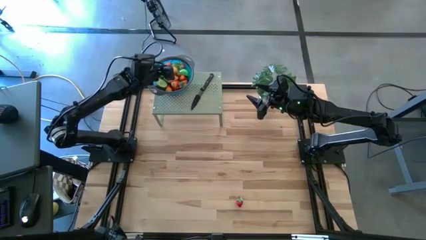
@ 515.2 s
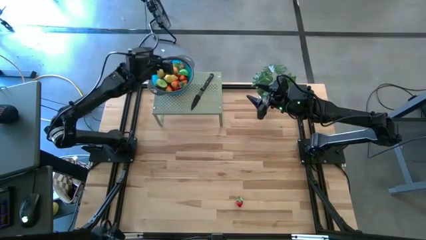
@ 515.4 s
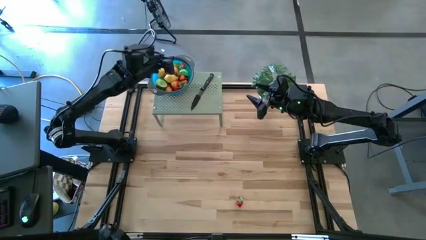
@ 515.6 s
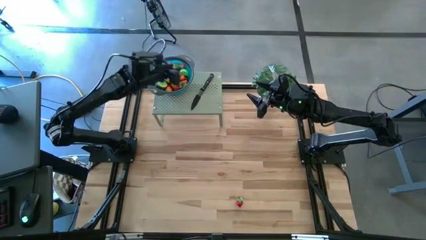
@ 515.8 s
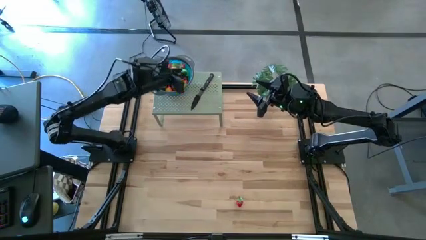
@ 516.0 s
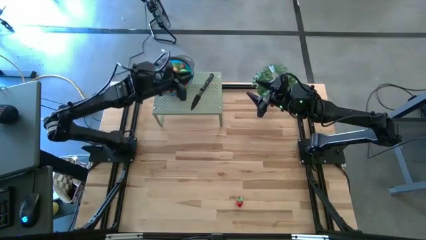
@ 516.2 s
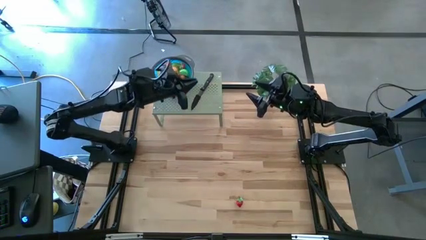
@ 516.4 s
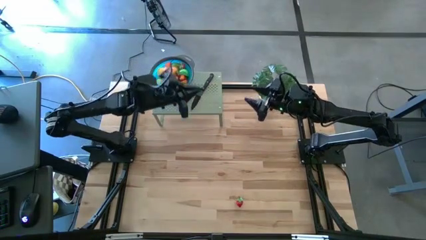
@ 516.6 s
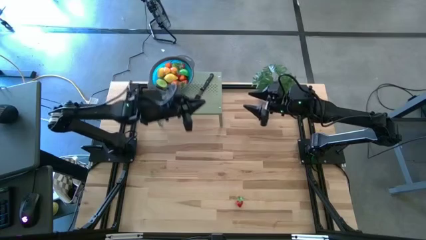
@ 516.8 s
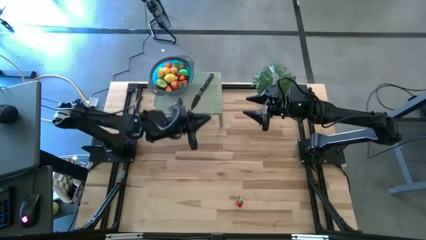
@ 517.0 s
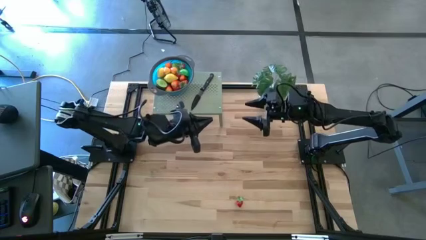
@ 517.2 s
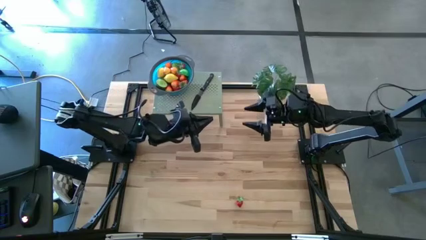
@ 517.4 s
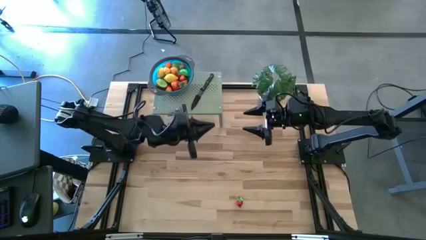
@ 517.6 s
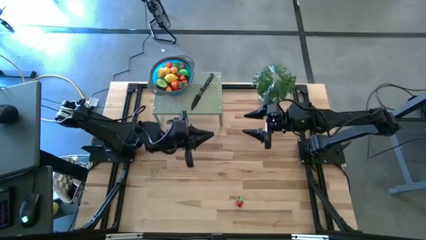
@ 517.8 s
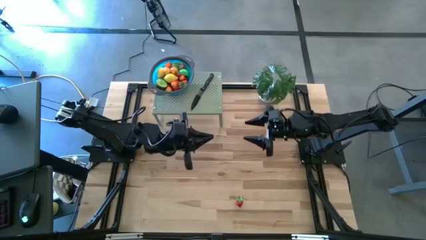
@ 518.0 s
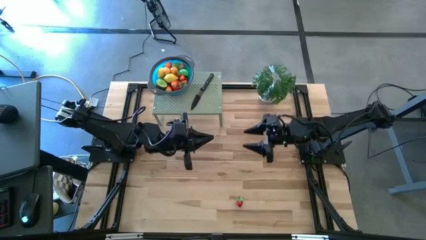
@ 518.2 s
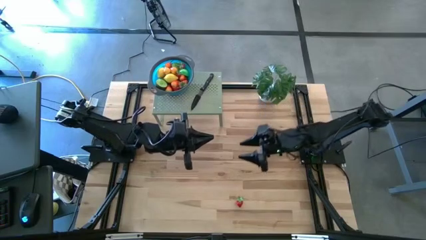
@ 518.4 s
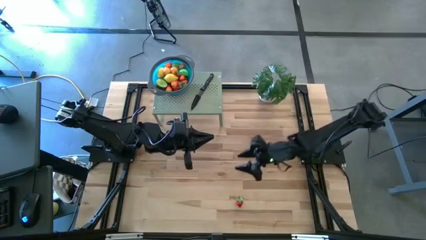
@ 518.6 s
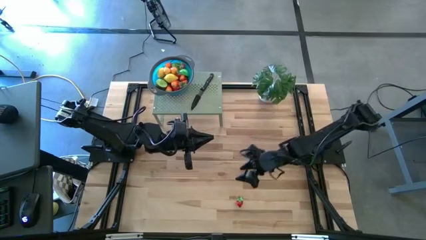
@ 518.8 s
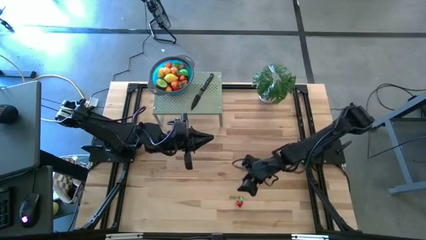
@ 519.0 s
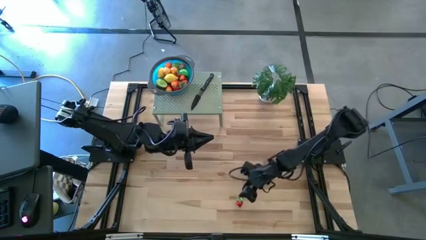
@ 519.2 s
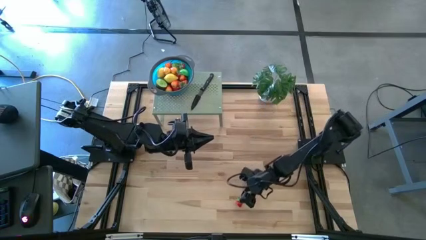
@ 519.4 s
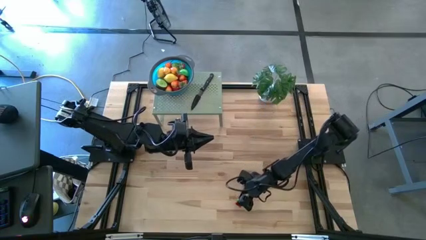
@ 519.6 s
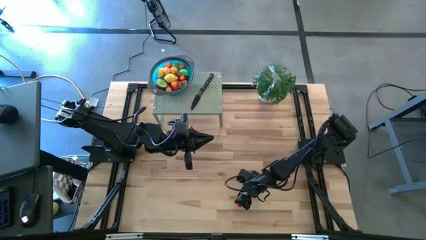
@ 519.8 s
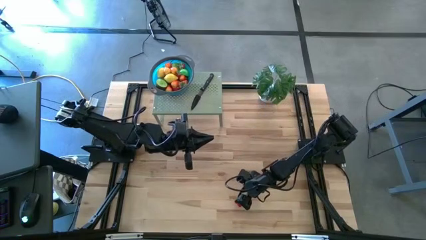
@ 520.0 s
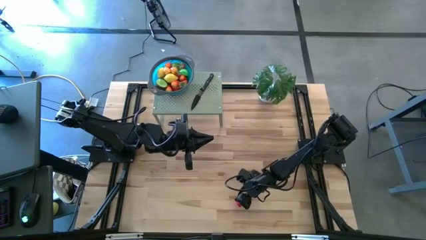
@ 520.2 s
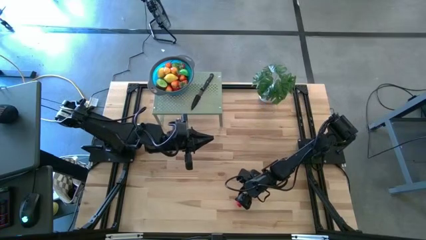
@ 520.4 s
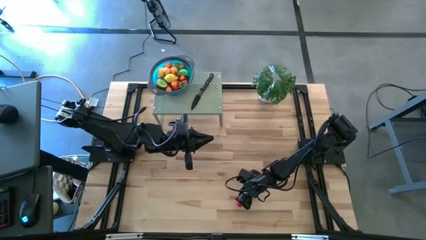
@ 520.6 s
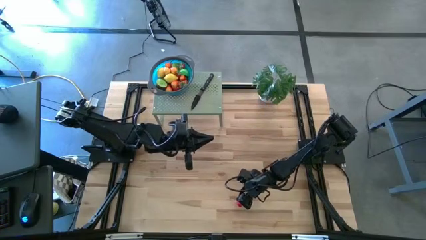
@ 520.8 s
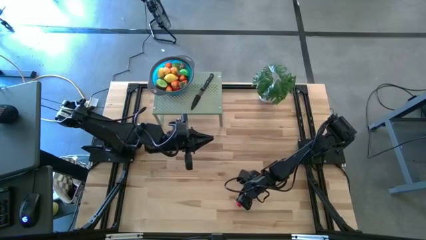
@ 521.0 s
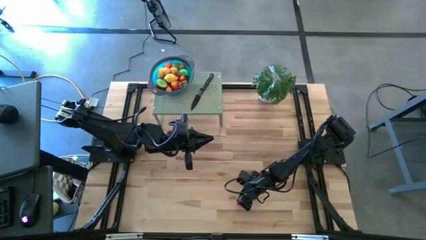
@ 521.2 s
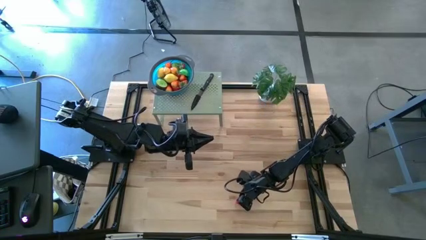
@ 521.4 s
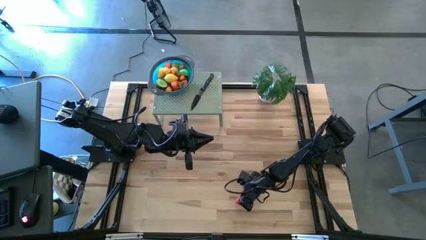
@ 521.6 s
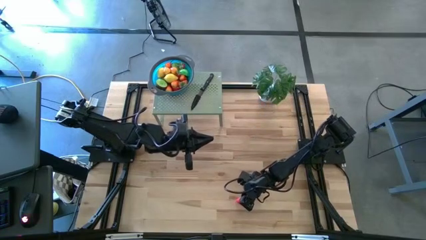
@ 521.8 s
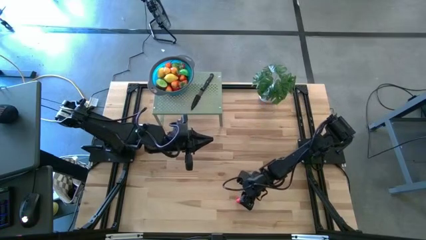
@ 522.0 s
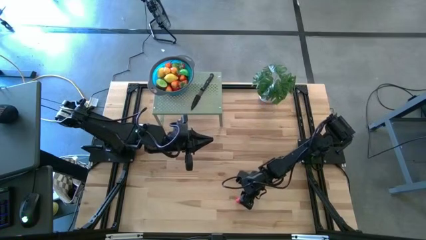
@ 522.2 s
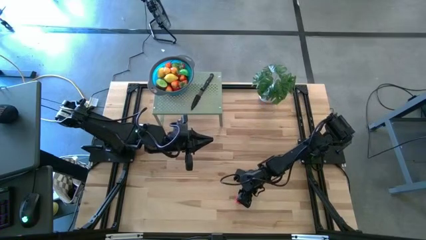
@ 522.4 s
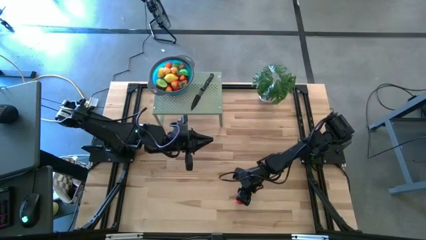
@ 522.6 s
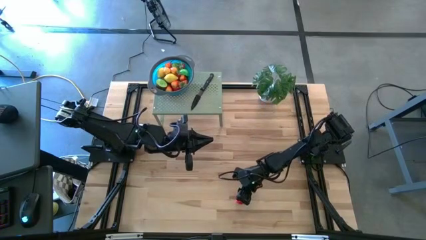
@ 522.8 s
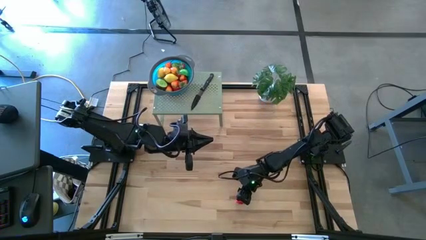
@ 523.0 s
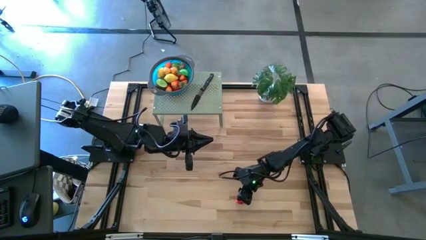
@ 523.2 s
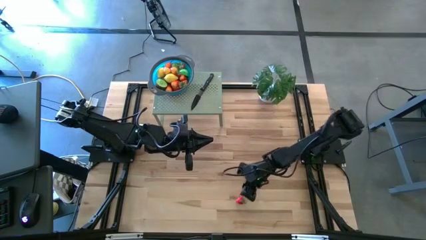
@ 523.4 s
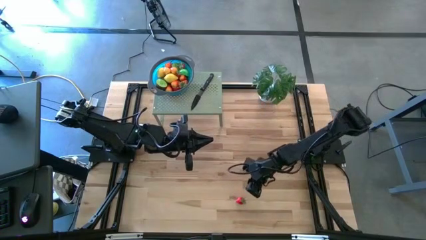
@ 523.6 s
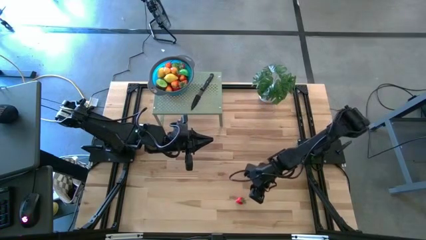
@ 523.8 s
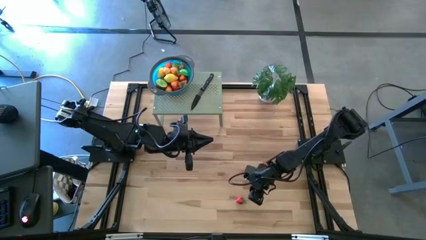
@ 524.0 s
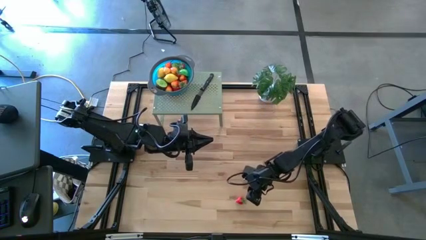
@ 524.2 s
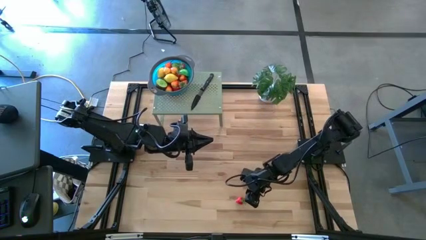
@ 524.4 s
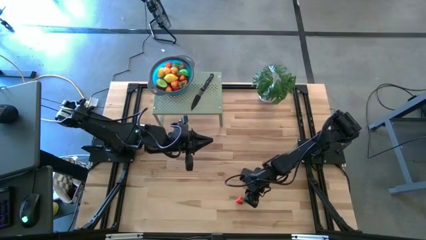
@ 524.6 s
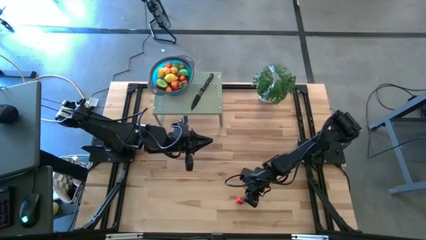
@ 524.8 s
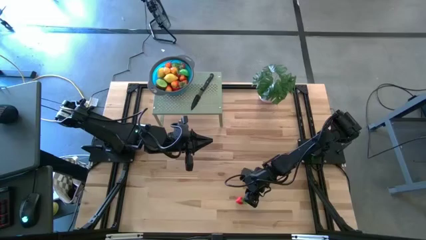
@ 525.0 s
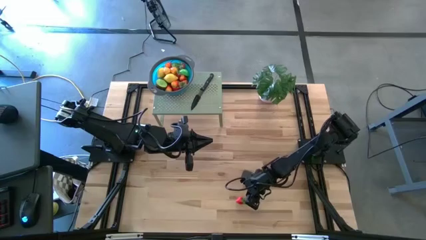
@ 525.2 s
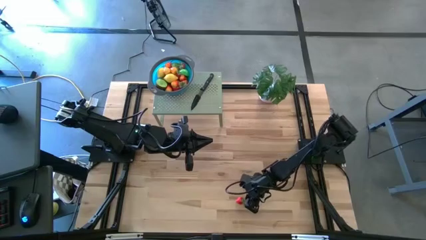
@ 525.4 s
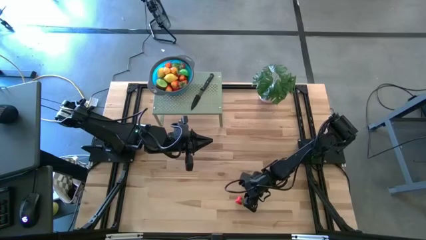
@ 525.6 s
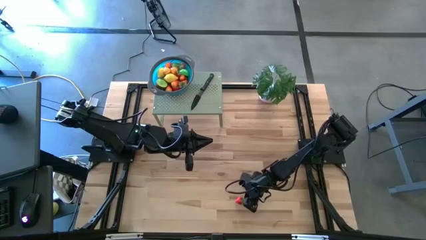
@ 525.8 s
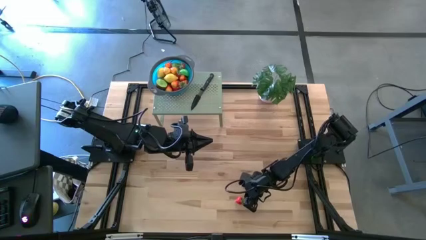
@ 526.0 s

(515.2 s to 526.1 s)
Task: Pick & Place Fruit
Put the strawberry into the strainer bowl on the shelf

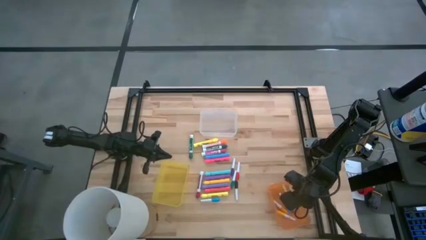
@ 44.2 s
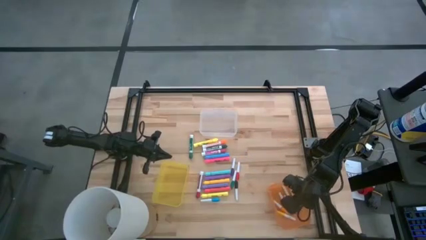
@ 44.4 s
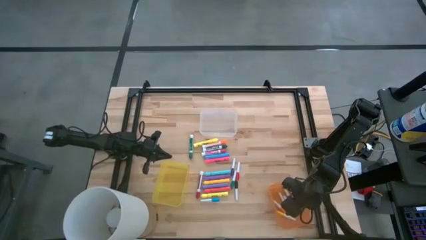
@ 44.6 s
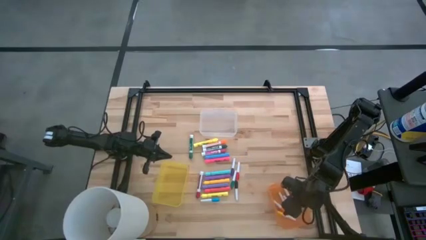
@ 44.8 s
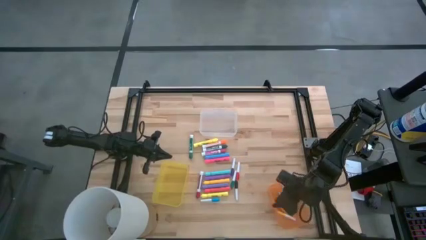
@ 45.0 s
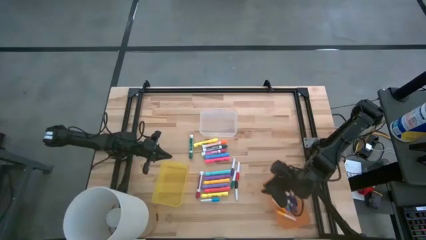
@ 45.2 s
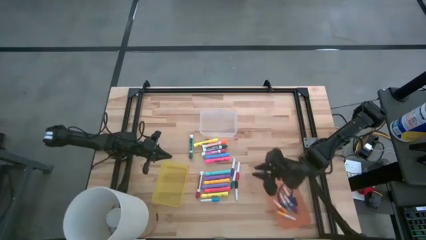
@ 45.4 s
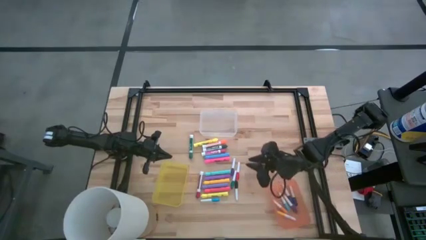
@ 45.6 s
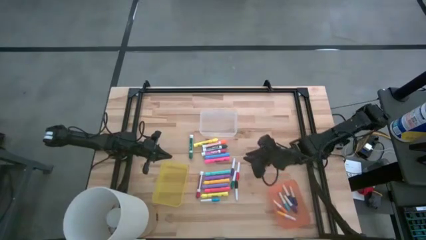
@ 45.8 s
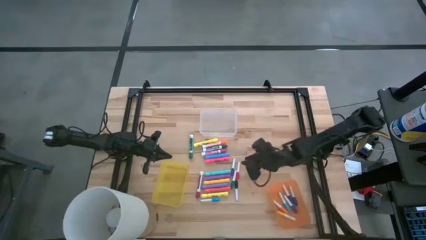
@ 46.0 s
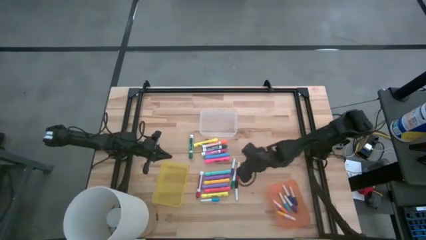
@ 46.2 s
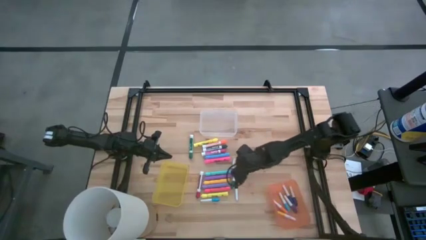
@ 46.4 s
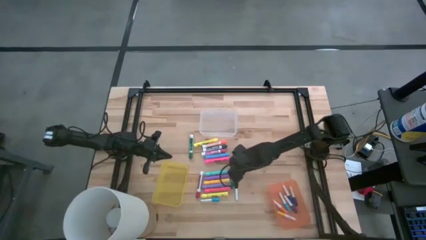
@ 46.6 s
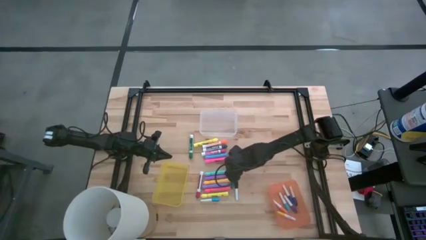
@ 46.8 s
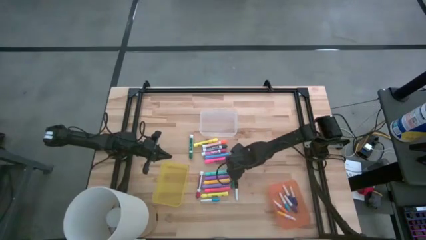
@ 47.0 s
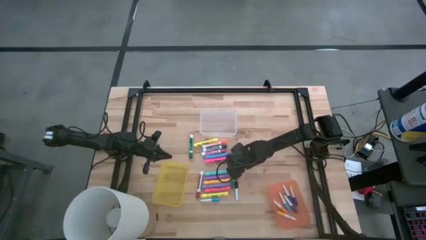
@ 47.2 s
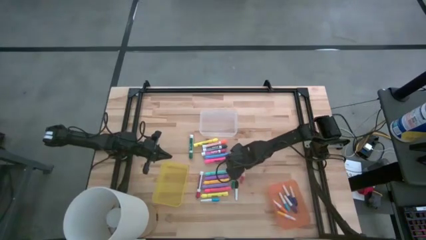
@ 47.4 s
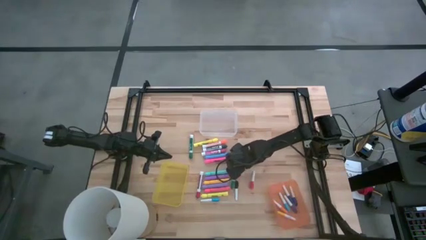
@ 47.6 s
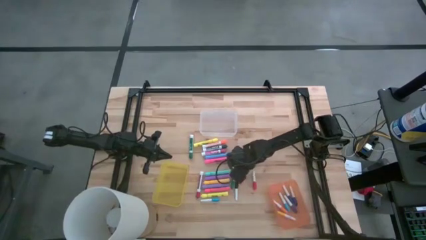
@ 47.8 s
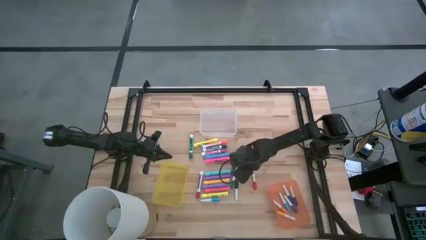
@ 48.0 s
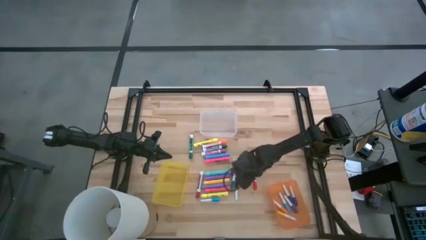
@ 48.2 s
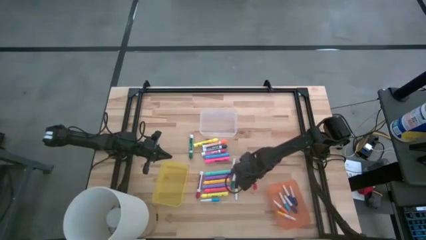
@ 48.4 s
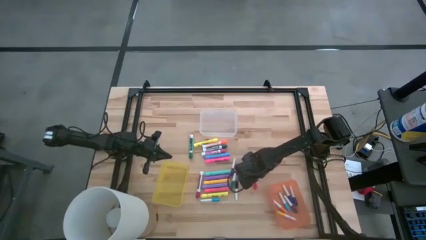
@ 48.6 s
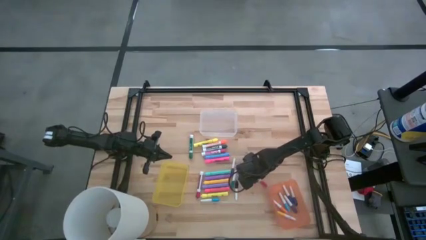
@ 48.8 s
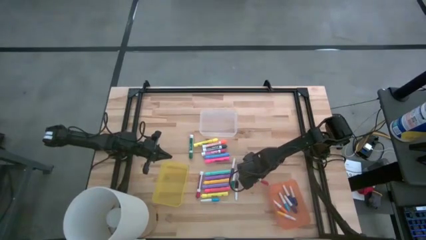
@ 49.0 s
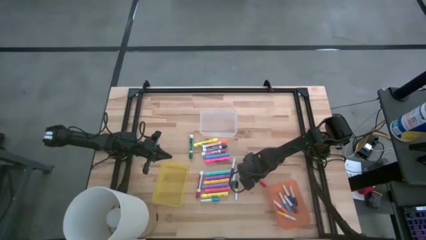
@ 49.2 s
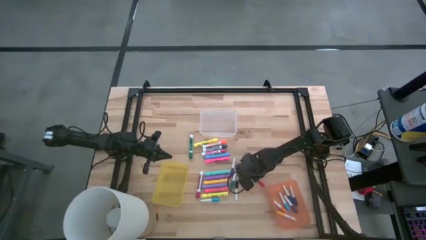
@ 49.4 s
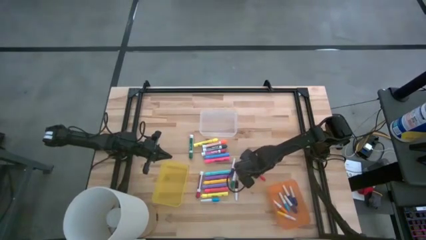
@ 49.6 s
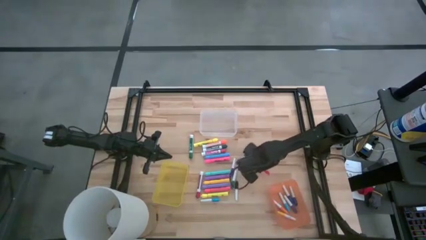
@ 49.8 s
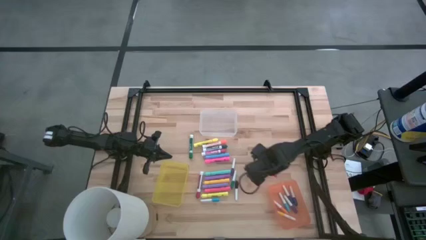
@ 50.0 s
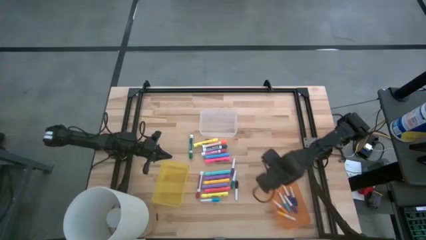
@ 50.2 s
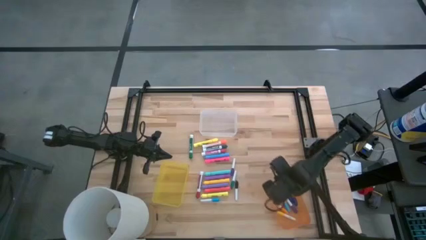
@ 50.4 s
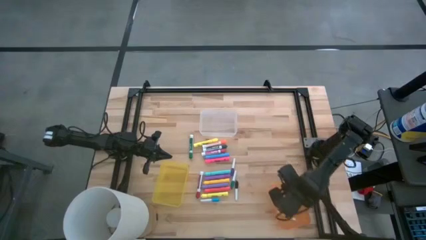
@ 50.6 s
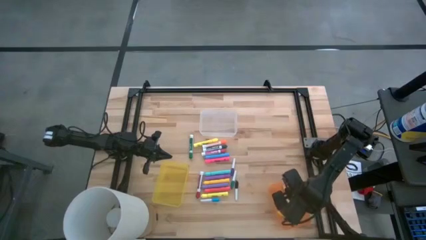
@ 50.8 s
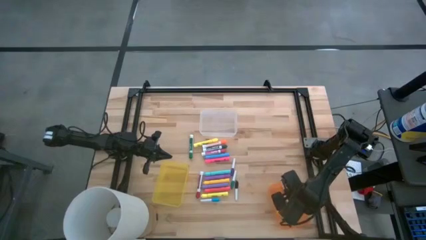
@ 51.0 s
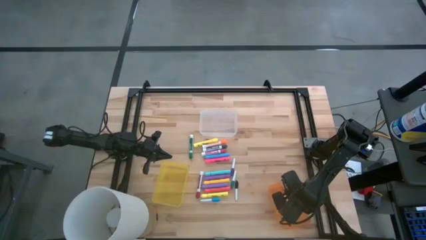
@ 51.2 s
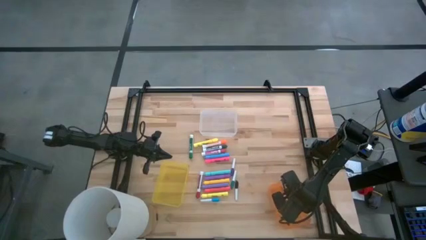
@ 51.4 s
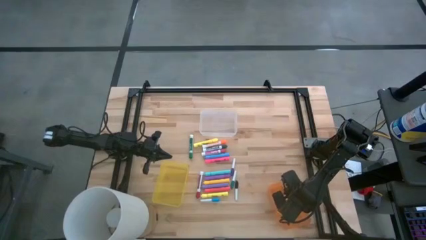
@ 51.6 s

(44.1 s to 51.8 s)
Task: Pick & Place Markers
Put the small red highlighter pen into the orange bin
